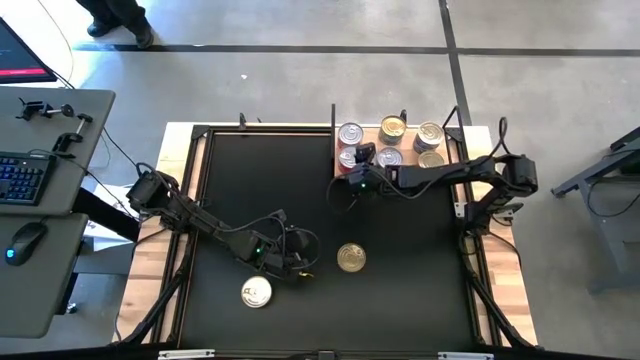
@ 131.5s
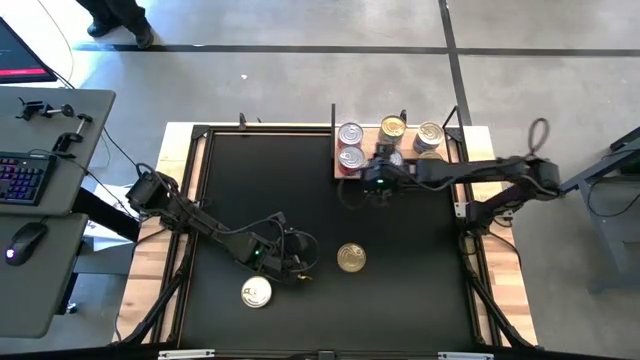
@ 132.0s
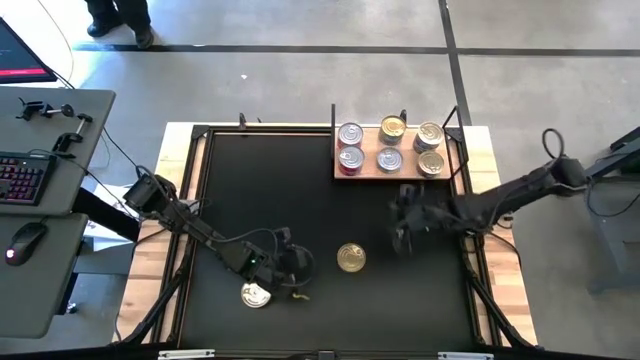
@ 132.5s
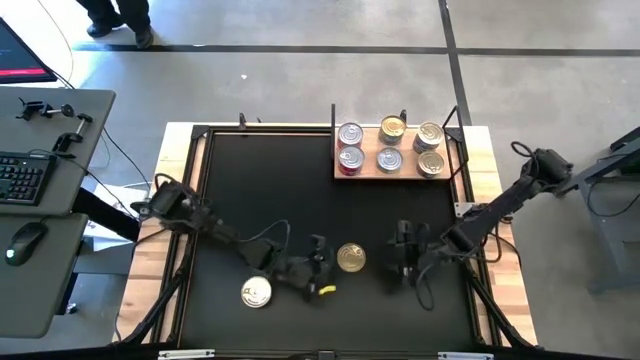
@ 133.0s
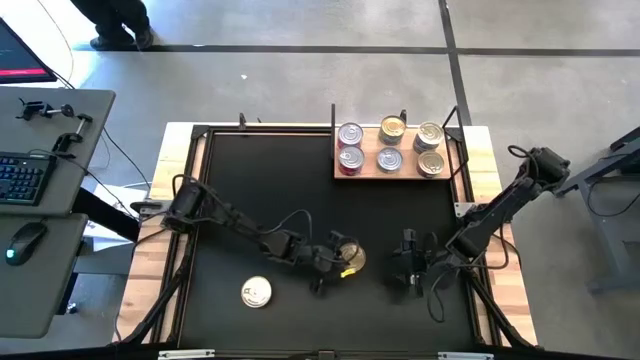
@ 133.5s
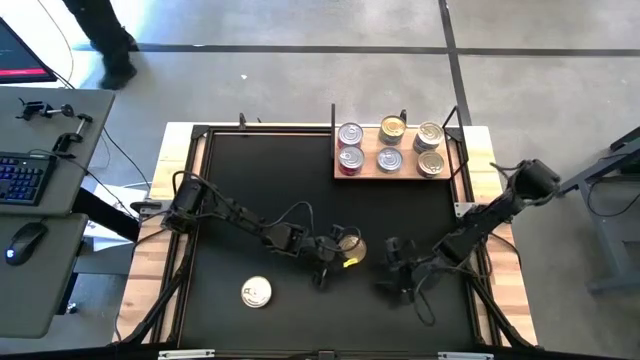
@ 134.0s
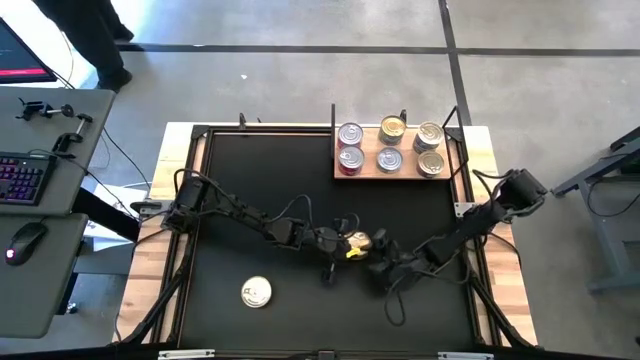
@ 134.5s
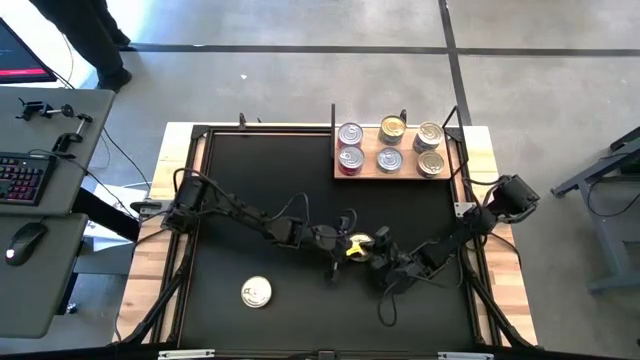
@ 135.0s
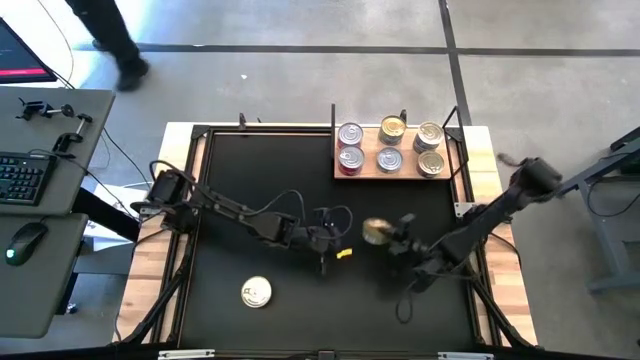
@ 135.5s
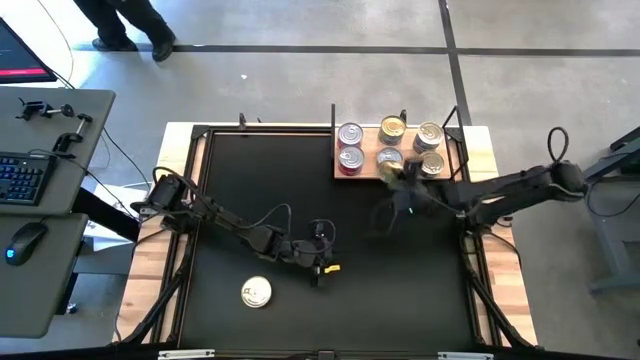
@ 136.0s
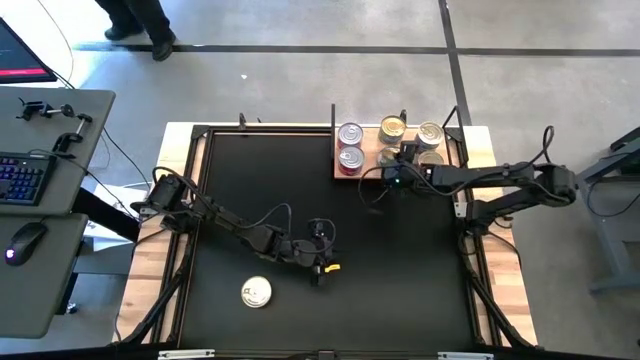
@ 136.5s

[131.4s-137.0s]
Task: Stack canned seafood by type on shelf
Stack the green tuna can on top of the bottom green tuna can on the shelf

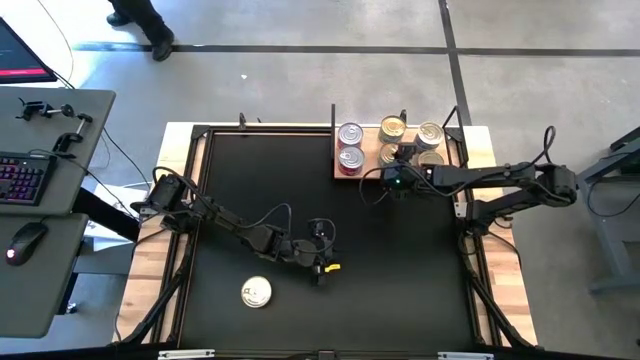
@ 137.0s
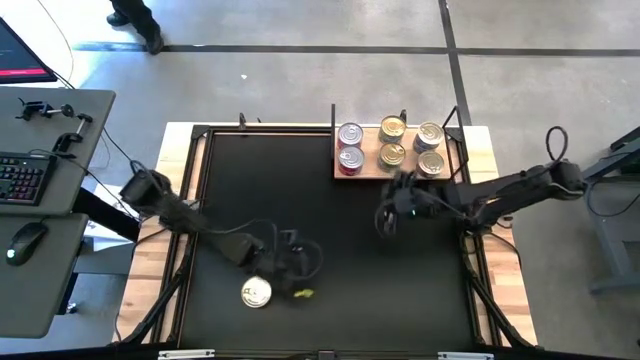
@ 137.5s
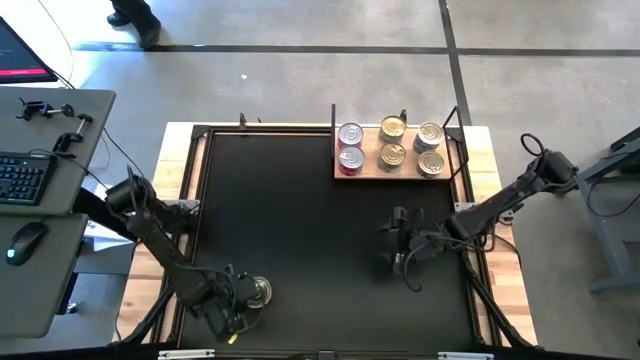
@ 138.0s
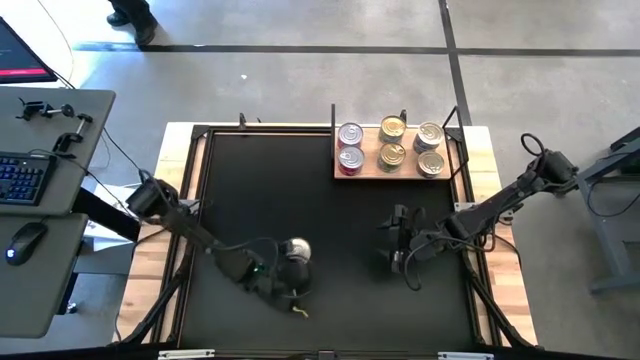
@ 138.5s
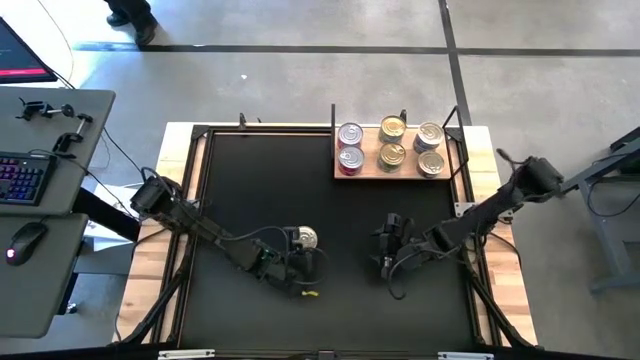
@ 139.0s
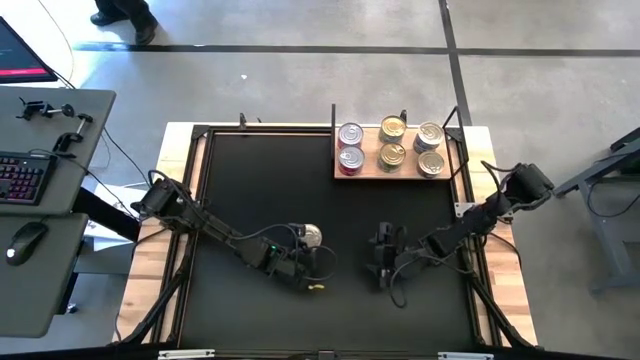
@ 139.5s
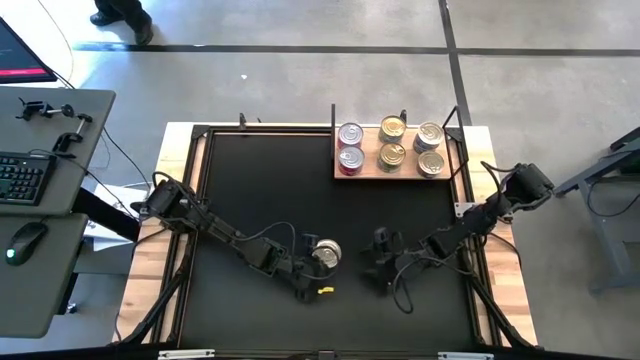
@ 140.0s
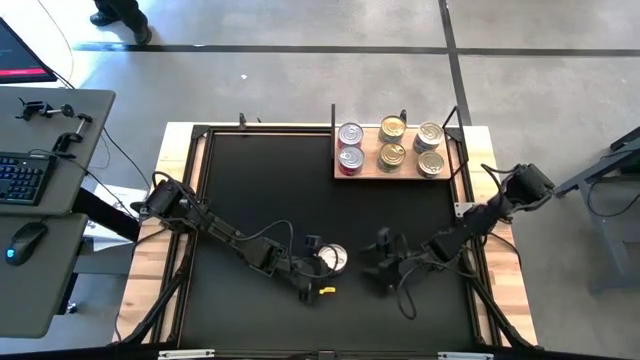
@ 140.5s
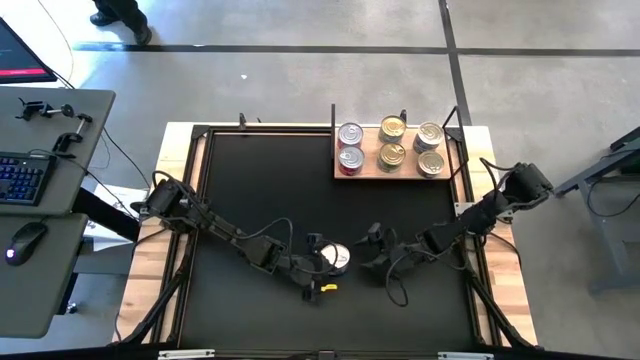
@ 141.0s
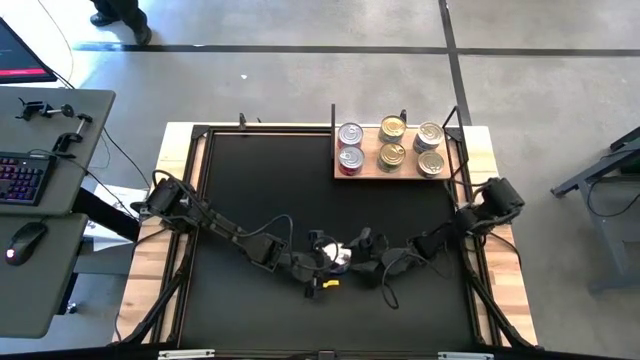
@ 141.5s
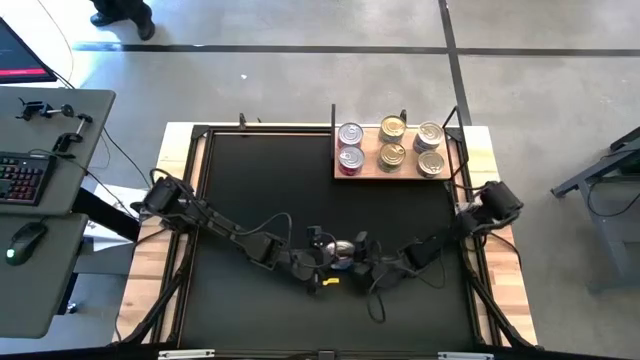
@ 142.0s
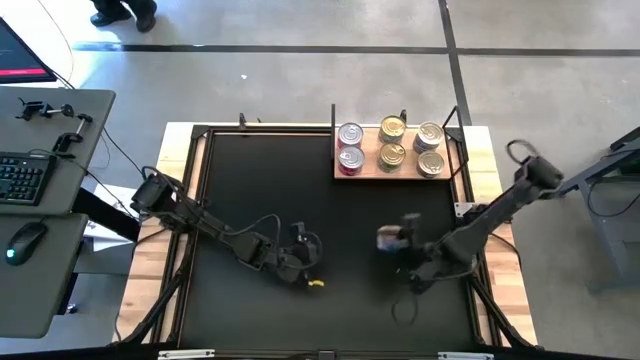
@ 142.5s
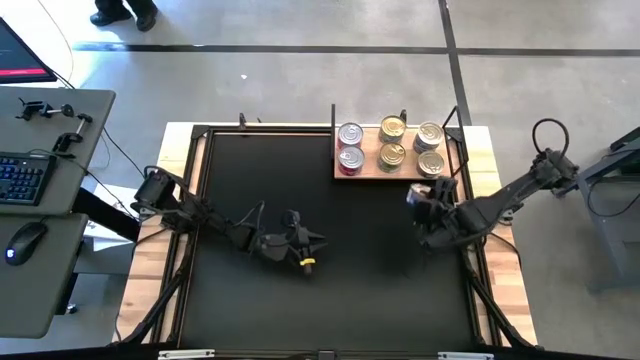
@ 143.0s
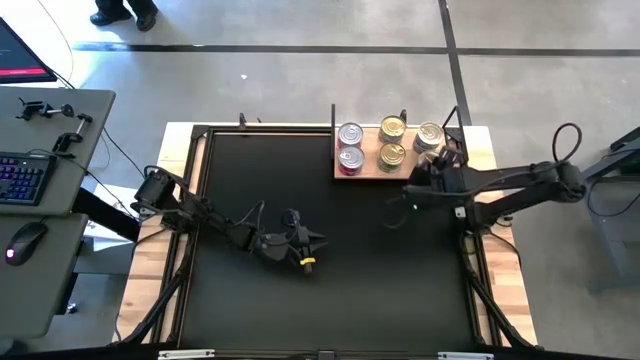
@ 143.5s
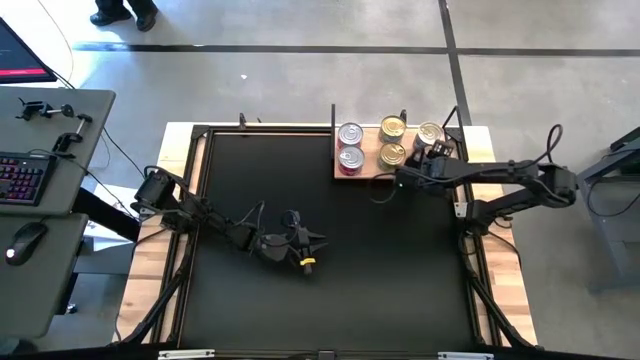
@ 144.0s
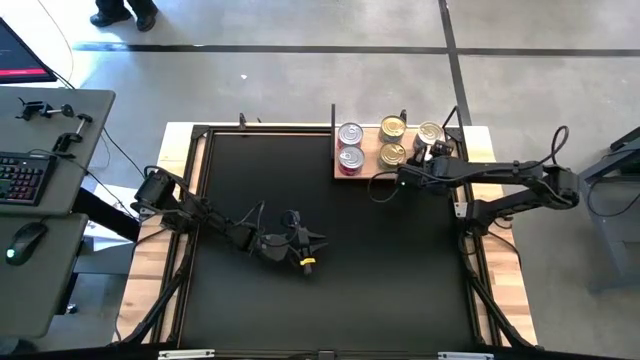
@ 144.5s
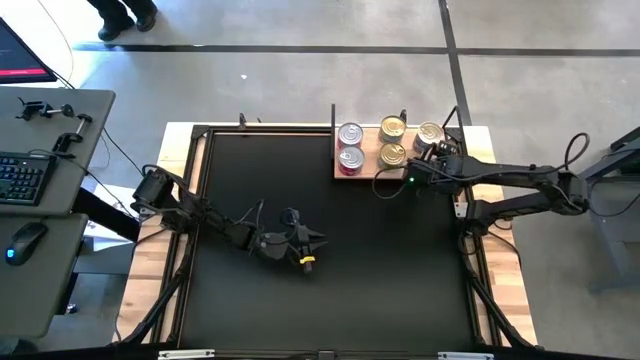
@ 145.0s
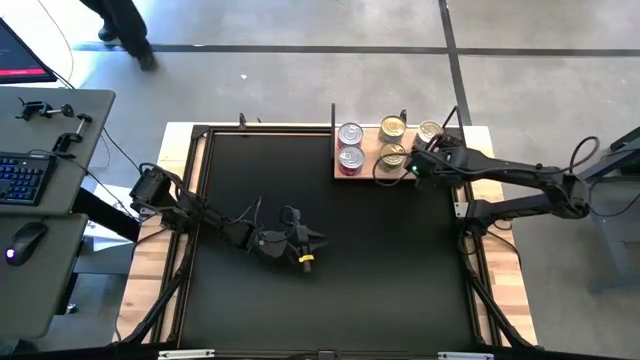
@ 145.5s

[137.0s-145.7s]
Stack the blue tuna can on top of the bottom blue tuna can on the shelf

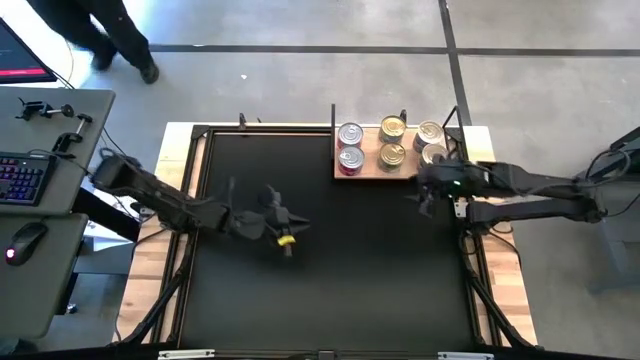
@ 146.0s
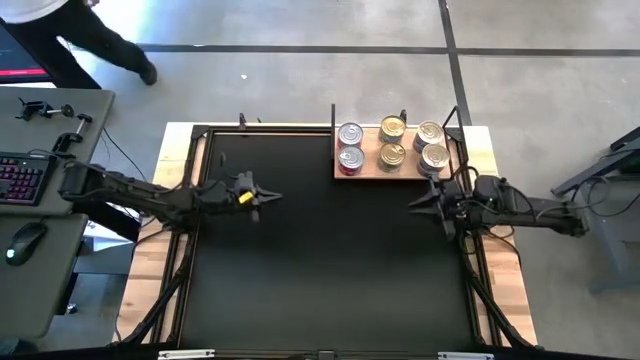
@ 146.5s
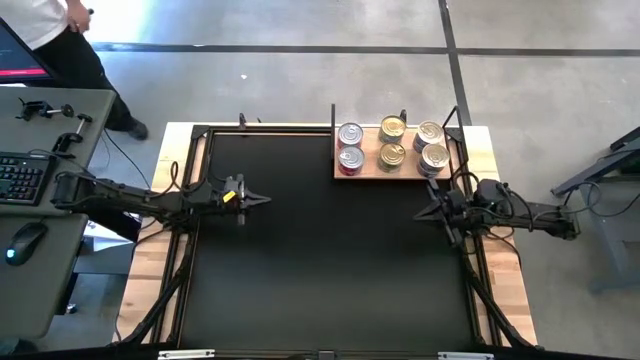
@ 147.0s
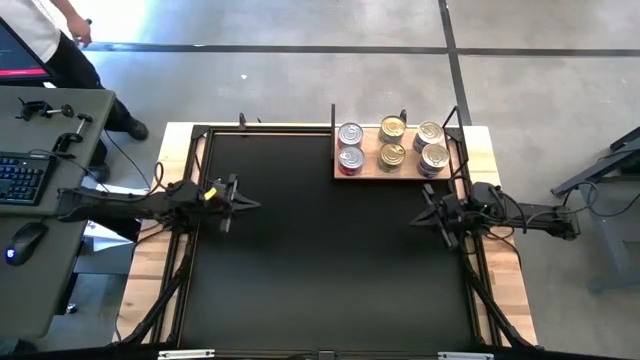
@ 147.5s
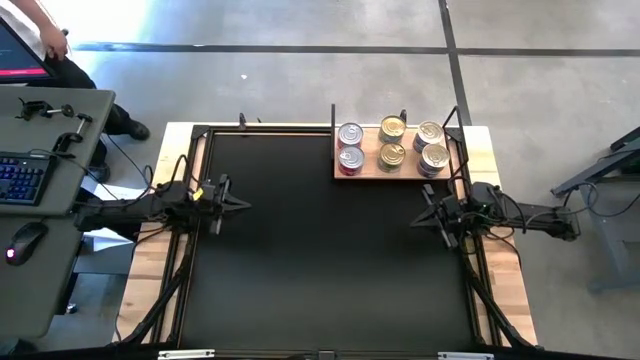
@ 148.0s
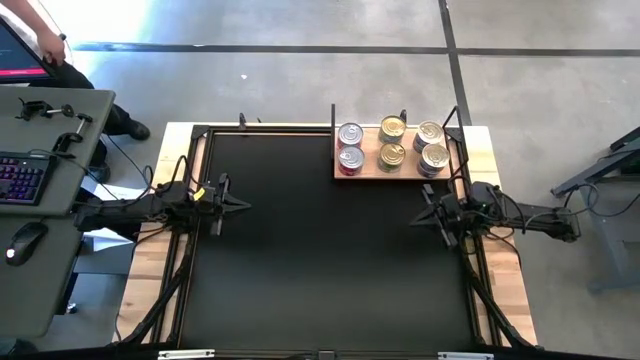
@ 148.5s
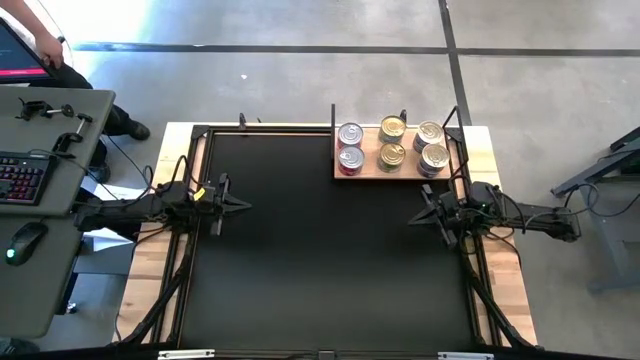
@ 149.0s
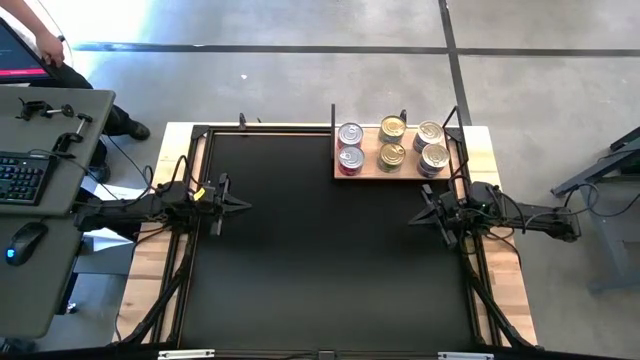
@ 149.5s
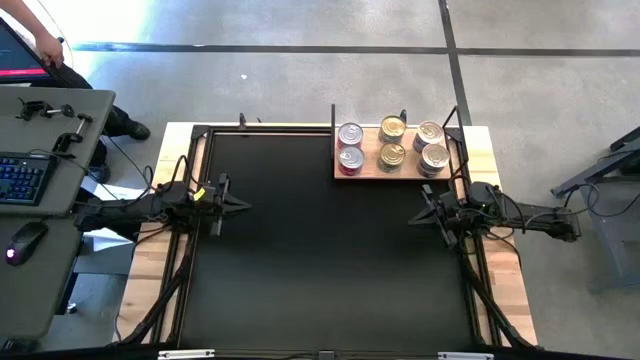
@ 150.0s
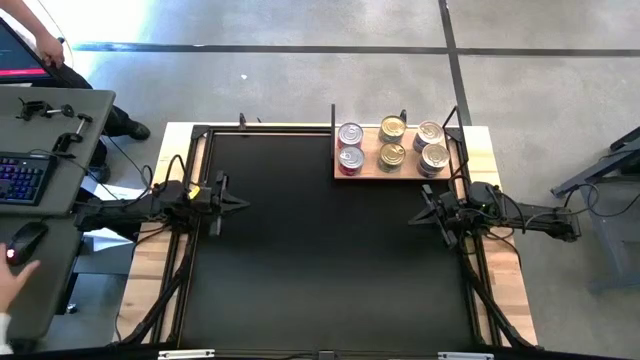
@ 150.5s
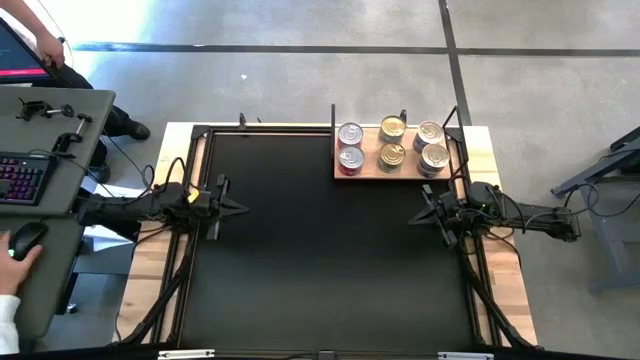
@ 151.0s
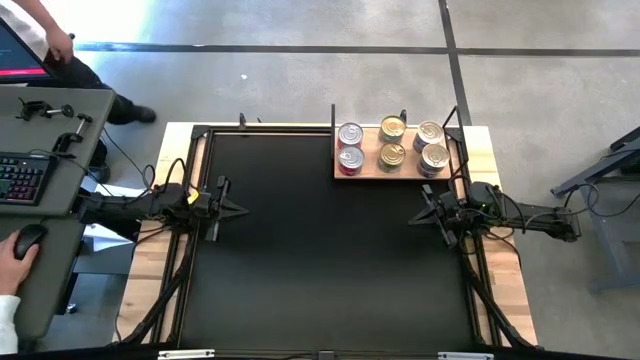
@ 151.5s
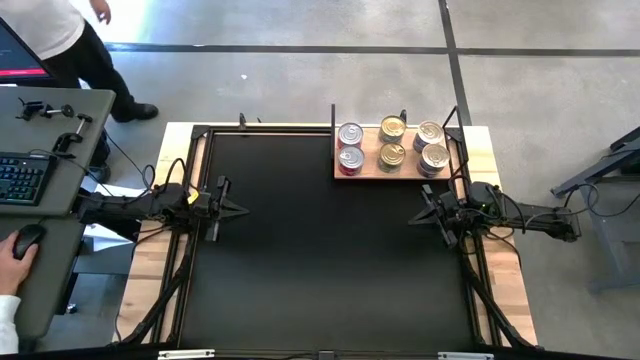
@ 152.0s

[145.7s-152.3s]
Return to Home Position
